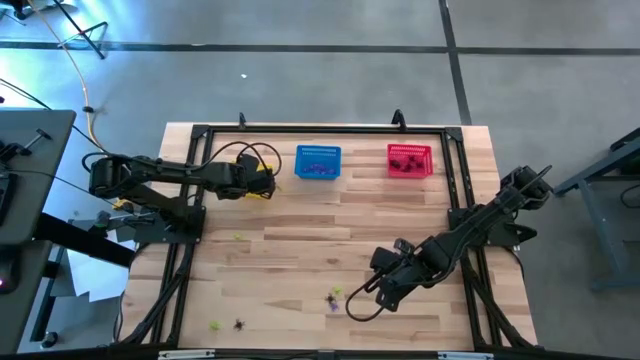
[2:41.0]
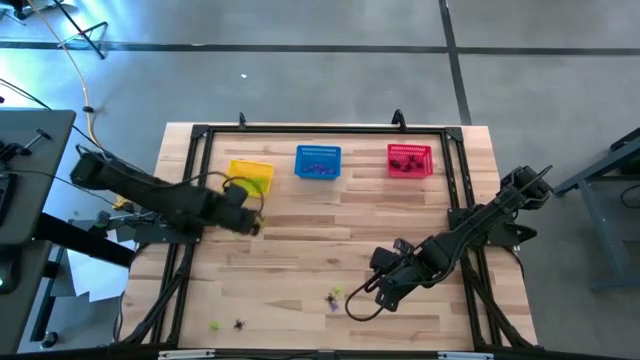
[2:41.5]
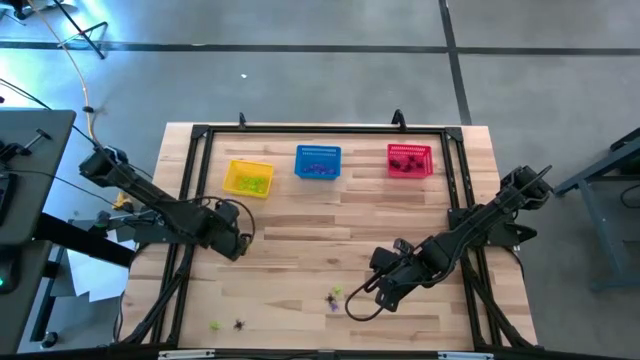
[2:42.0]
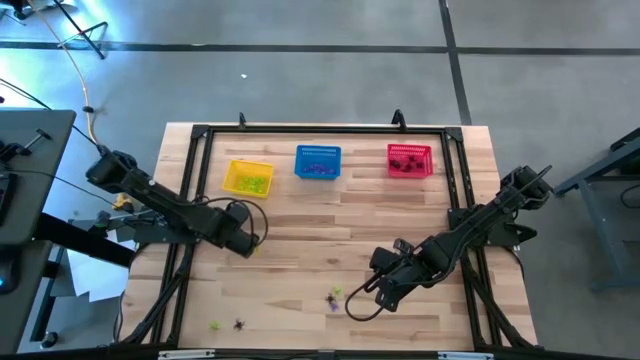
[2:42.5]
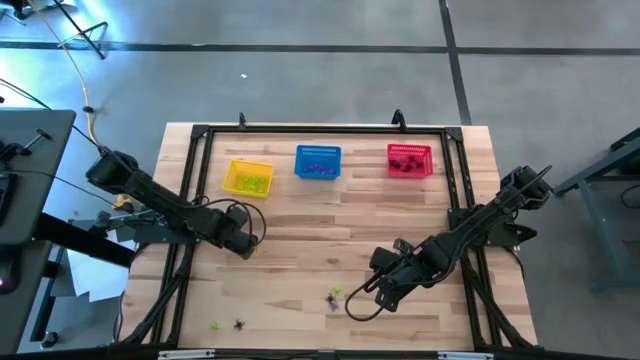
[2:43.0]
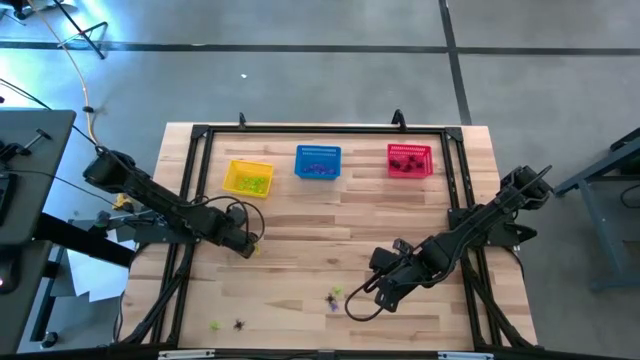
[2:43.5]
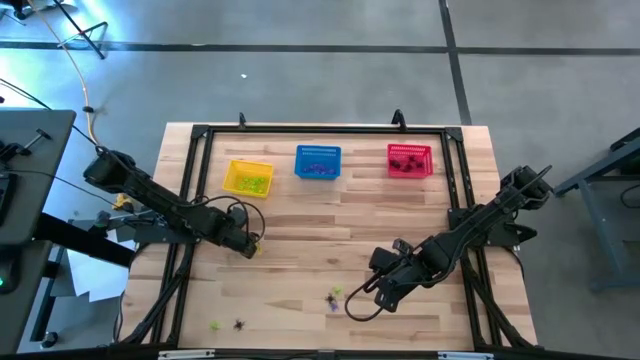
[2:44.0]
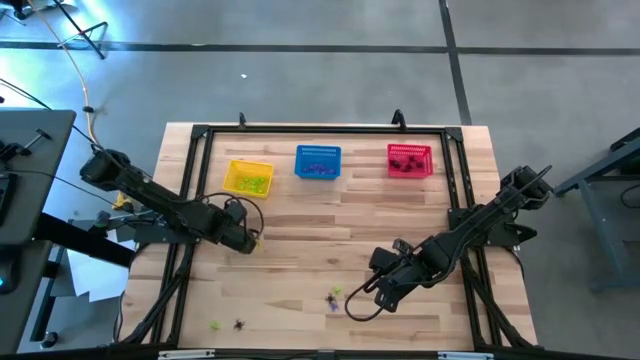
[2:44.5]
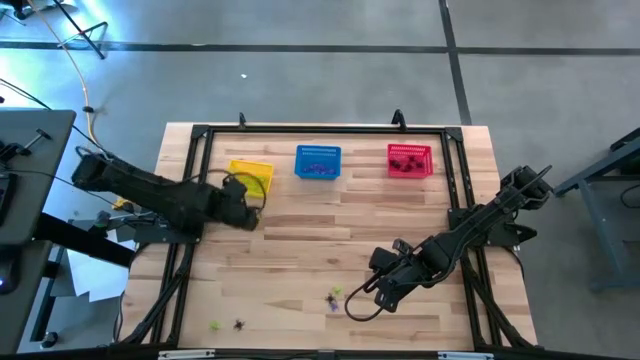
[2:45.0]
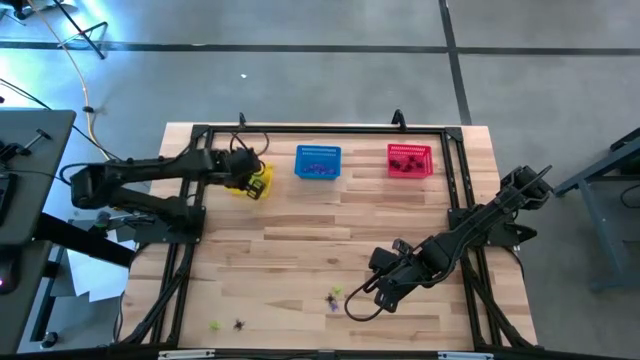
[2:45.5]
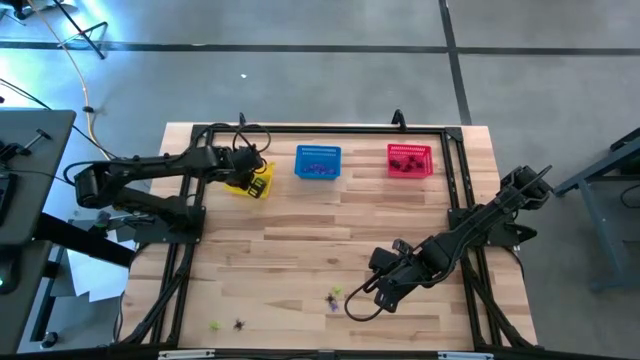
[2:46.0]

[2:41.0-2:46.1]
Task: Sort Halloween decoration
Put the green spider toy into the yellow bin

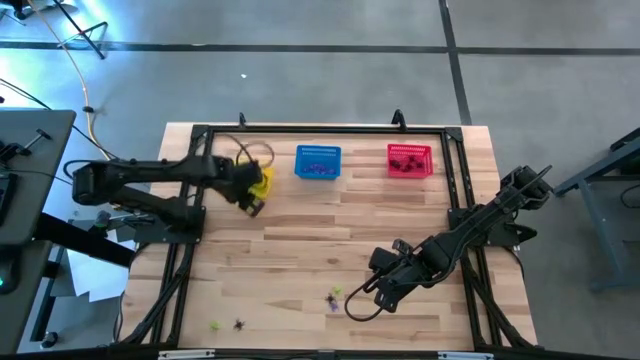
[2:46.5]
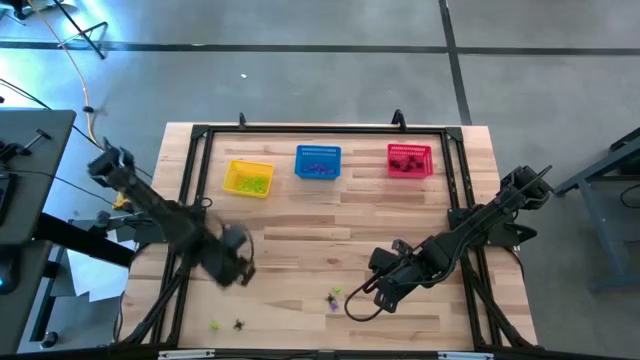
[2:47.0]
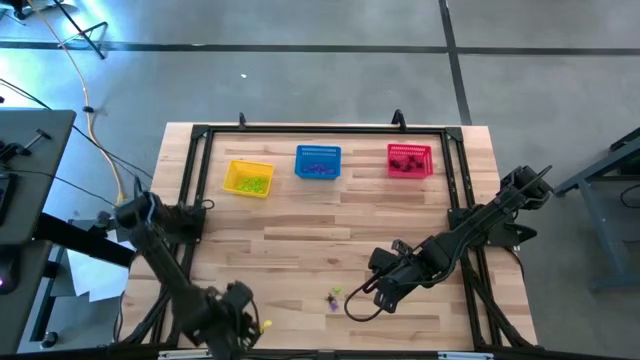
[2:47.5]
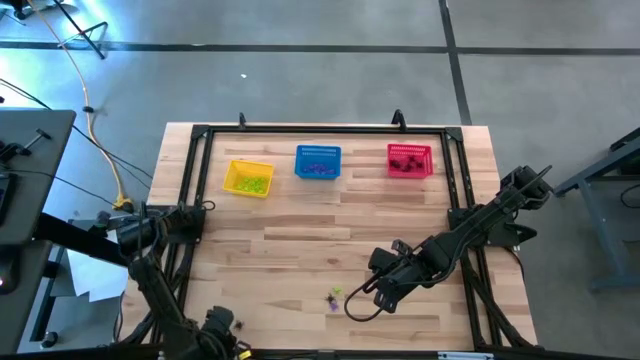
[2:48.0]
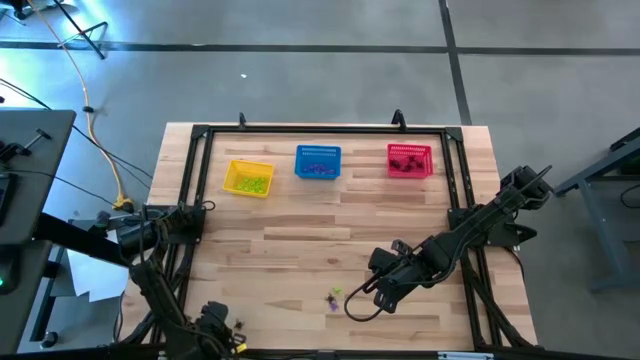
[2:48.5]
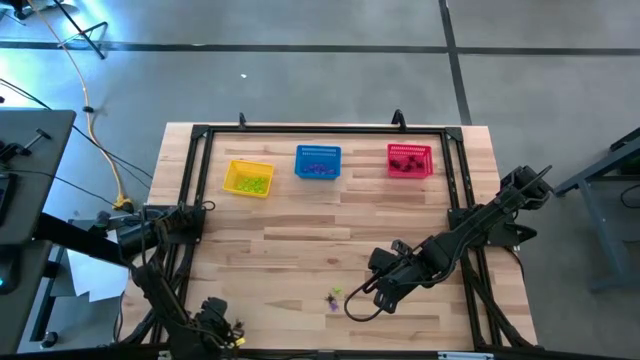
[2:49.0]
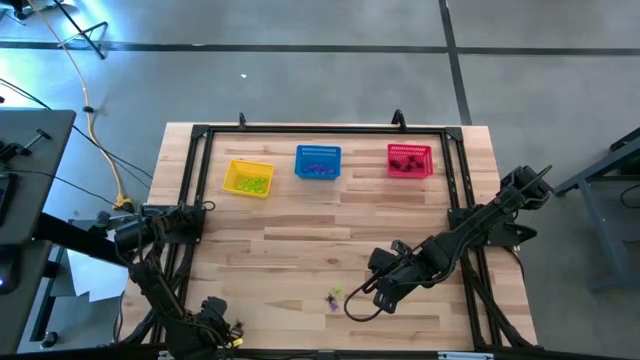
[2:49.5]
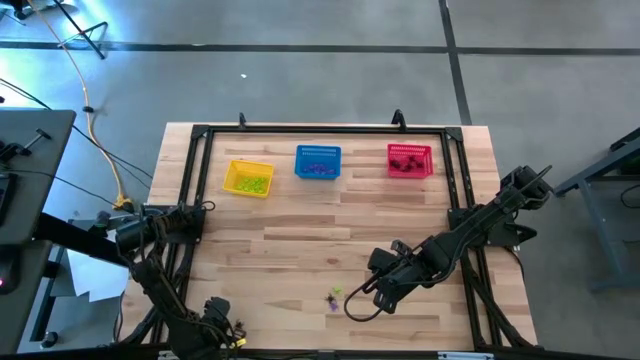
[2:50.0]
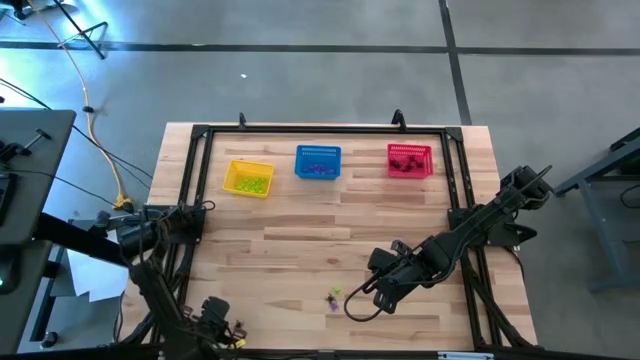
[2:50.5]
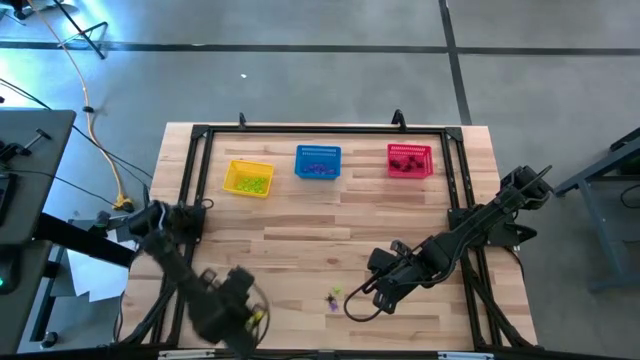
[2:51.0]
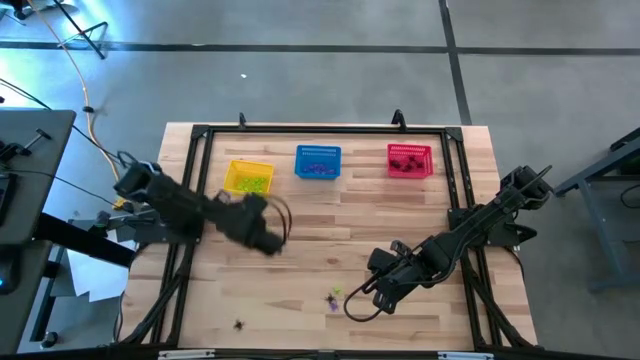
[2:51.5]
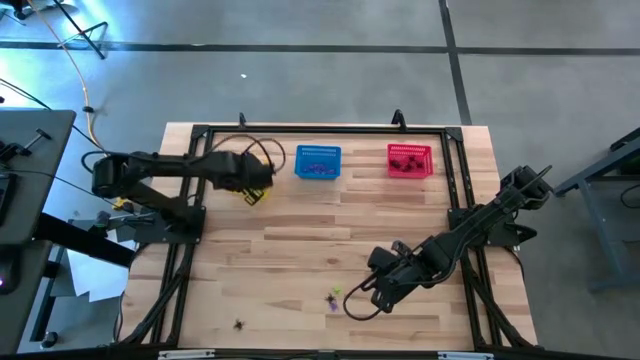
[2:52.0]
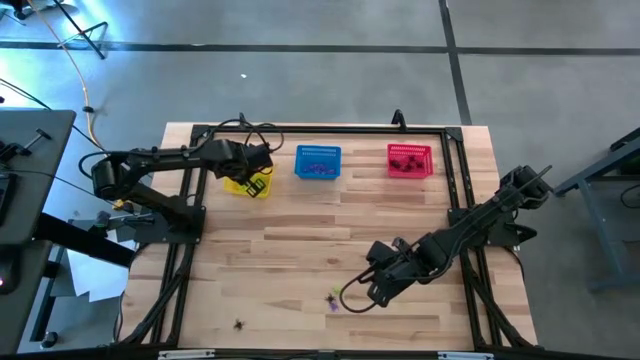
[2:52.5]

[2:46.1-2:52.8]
Put the green spider toy into the yellow bin

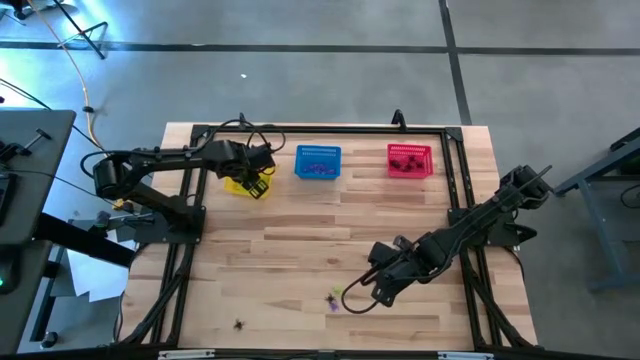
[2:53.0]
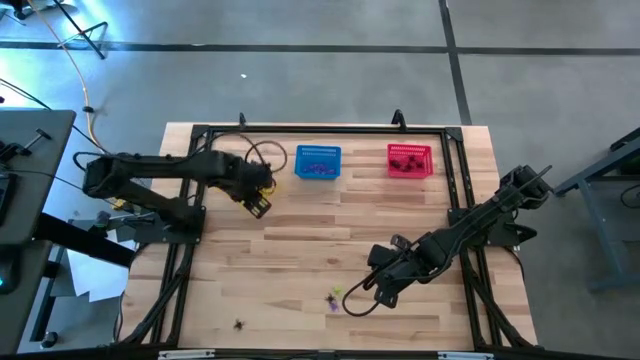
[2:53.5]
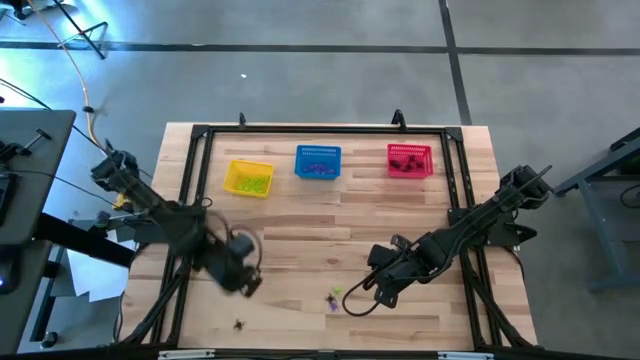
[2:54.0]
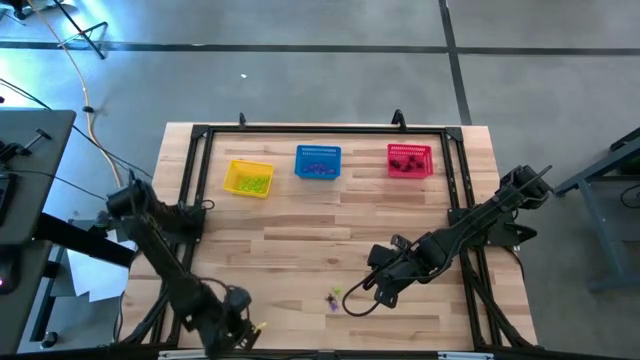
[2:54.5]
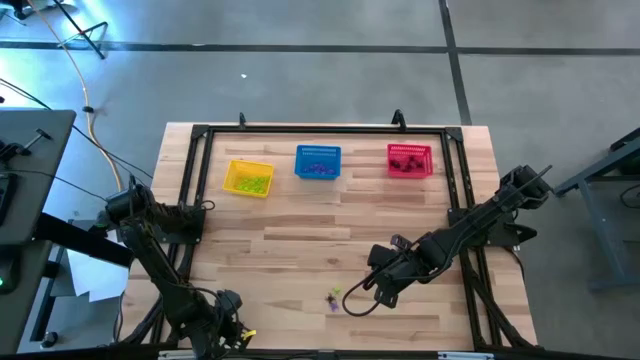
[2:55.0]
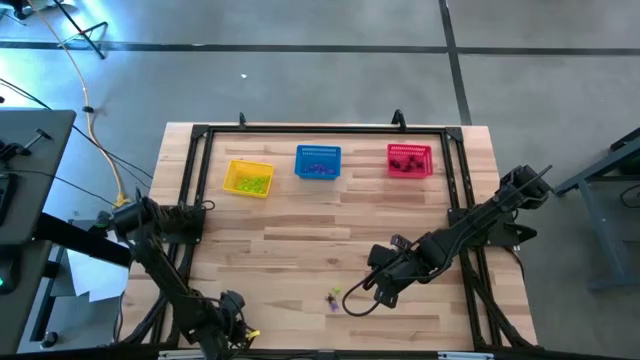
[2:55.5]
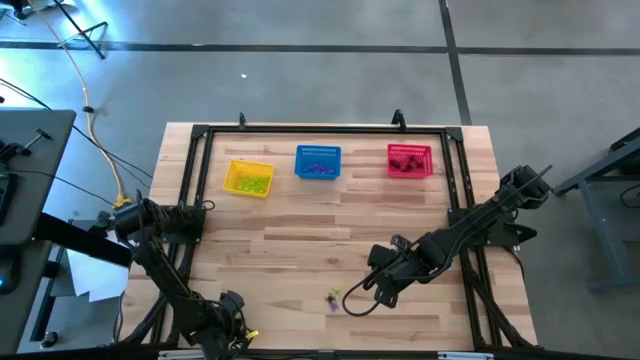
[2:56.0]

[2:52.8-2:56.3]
Put the black spider toy into the red bin

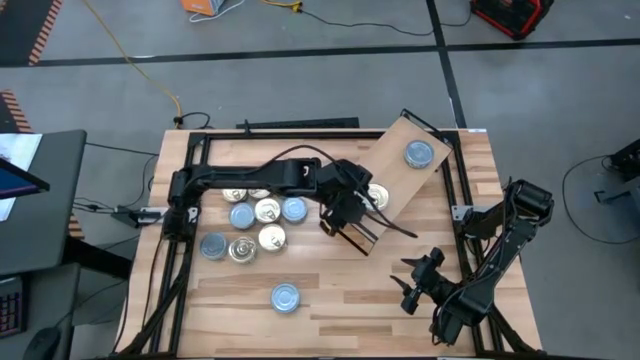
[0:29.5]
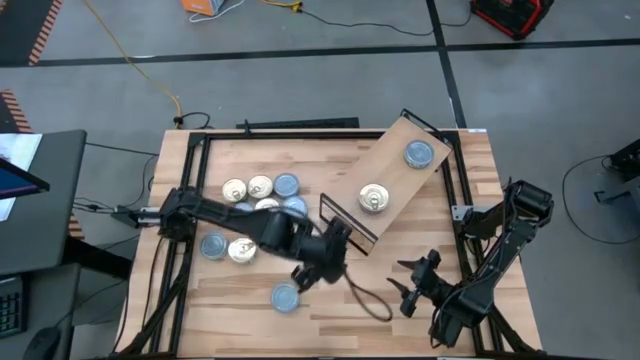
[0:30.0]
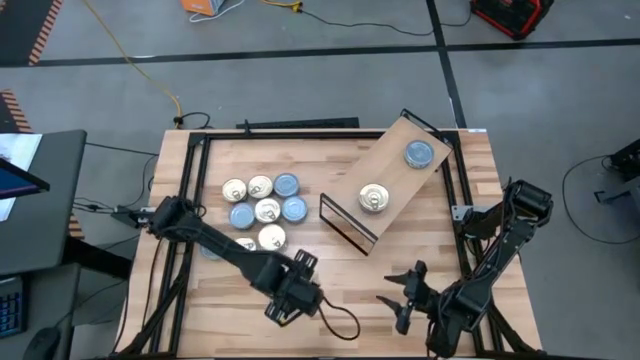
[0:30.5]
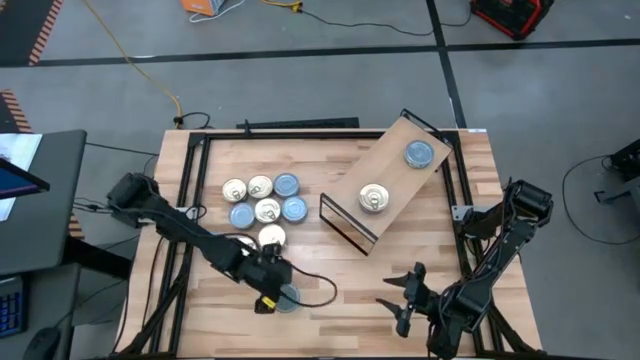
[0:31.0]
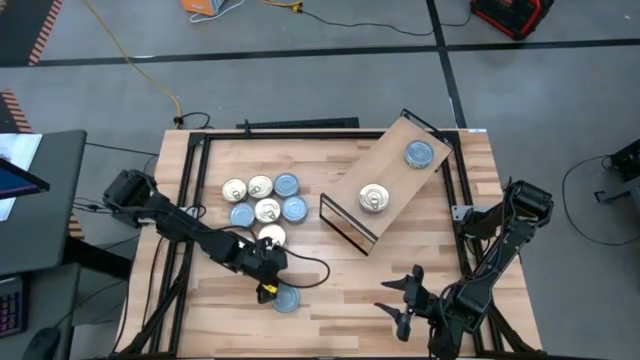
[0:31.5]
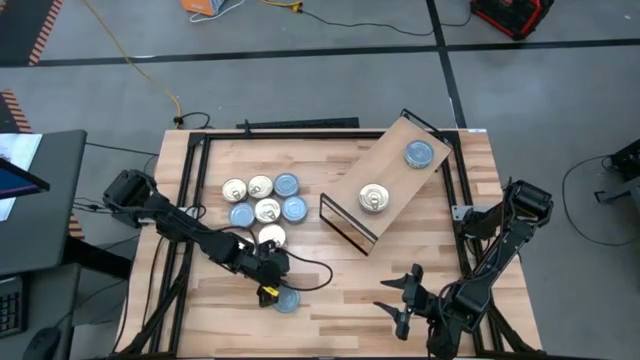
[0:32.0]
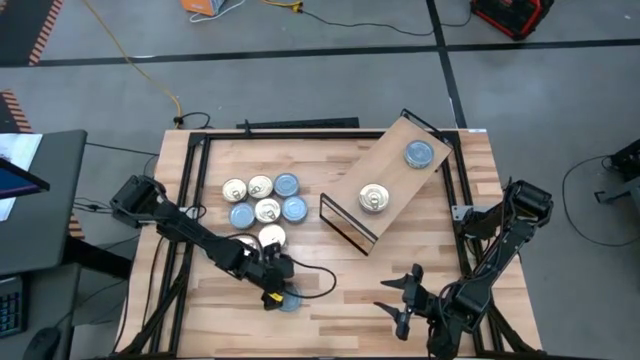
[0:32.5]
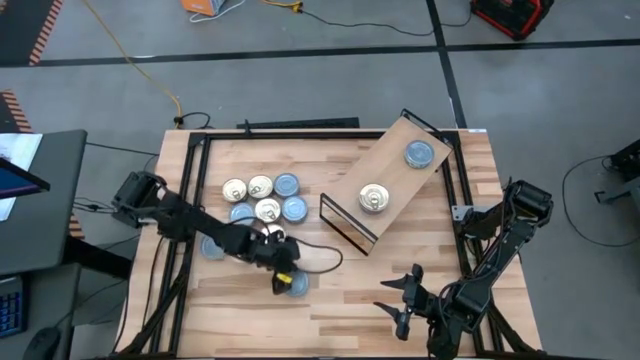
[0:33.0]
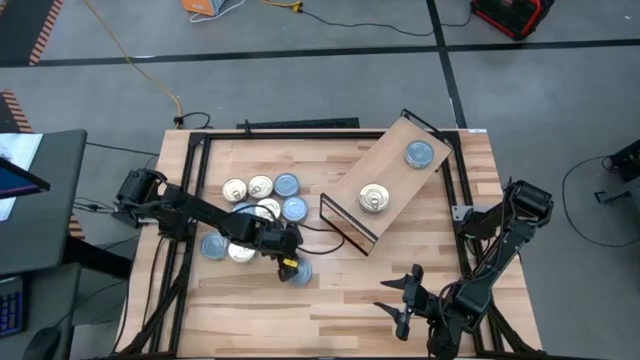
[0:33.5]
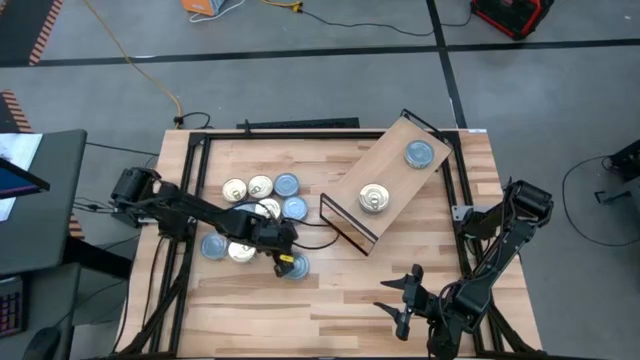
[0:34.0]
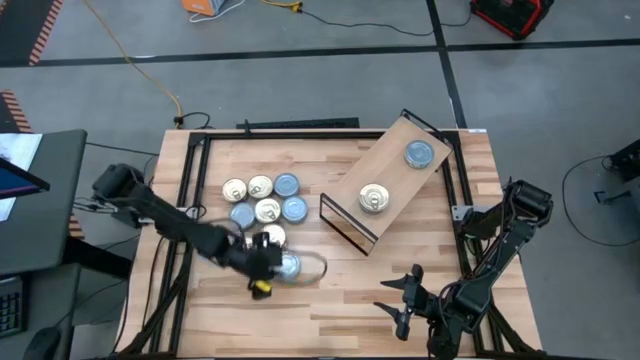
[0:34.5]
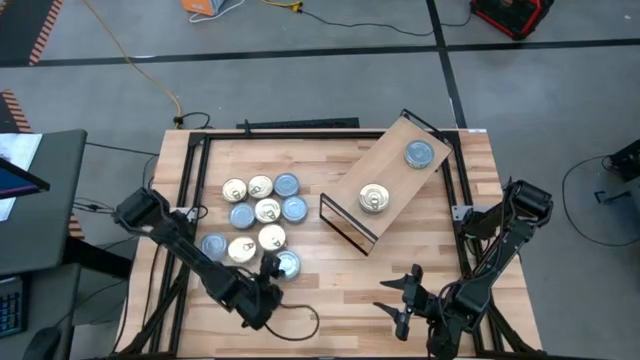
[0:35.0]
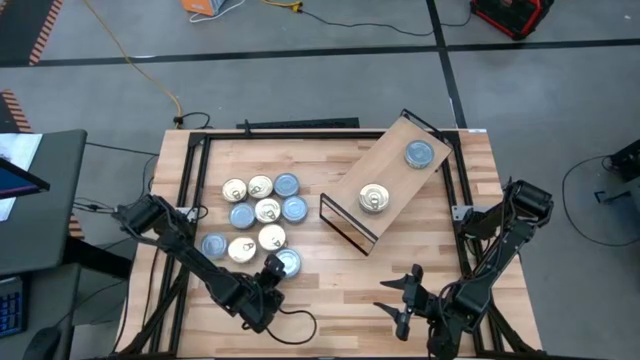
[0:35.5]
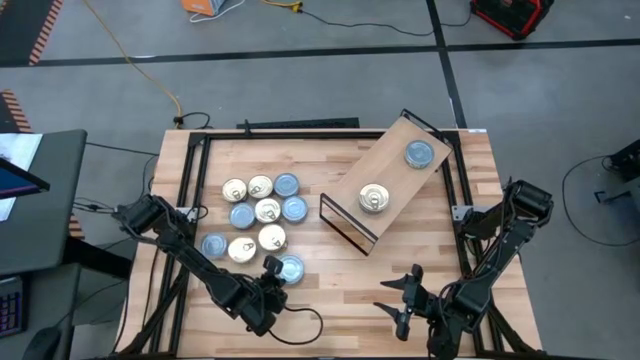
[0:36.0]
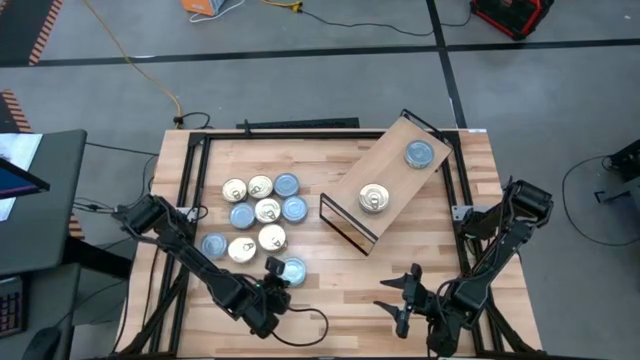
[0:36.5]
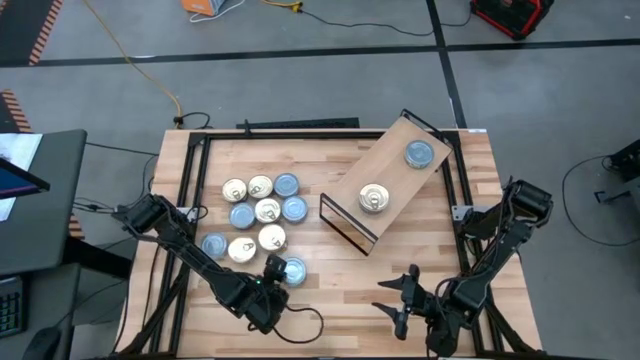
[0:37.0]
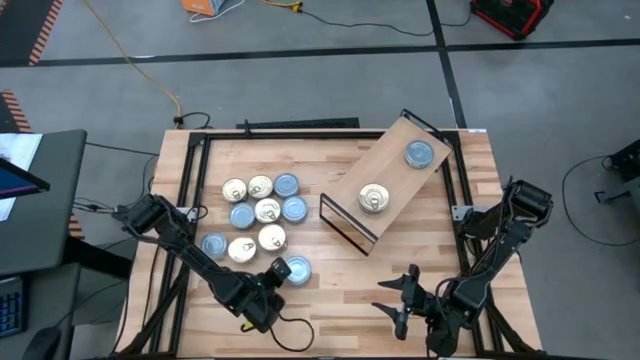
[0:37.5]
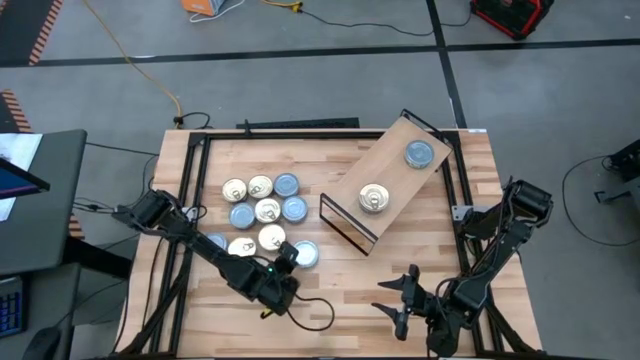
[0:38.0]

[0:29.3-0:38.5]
Task: Stack canned seafood by type on shelf
Stack the green tuna can on the shelf
